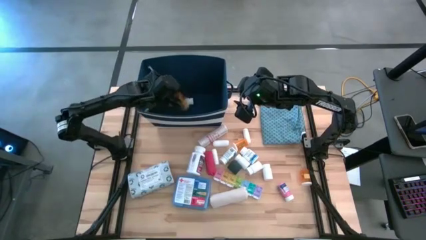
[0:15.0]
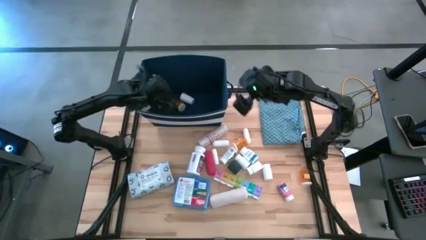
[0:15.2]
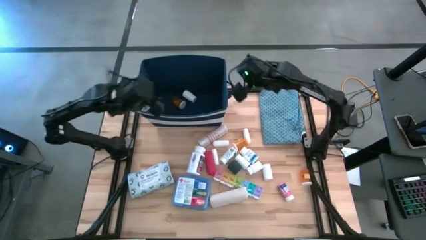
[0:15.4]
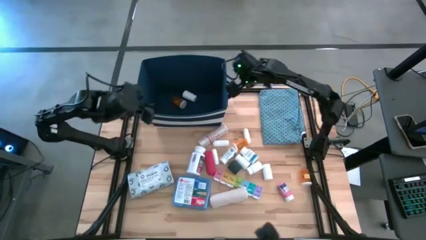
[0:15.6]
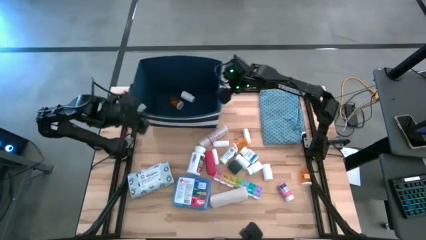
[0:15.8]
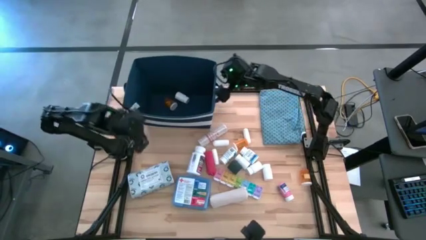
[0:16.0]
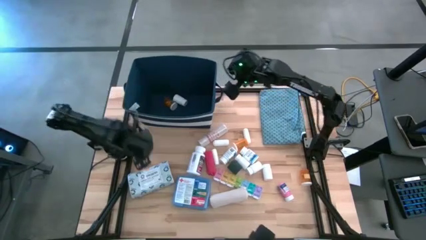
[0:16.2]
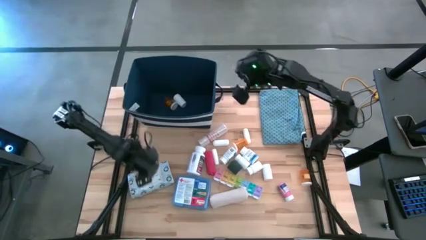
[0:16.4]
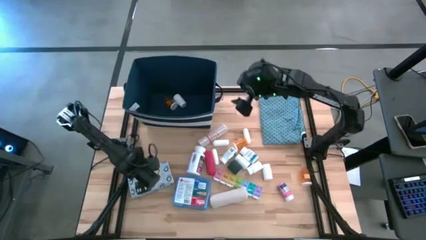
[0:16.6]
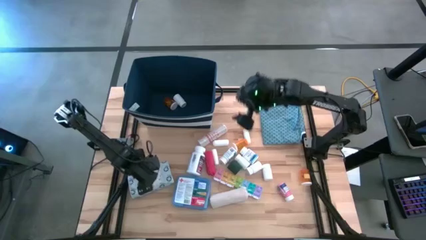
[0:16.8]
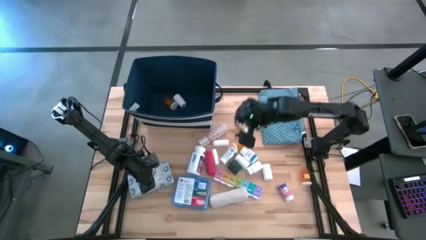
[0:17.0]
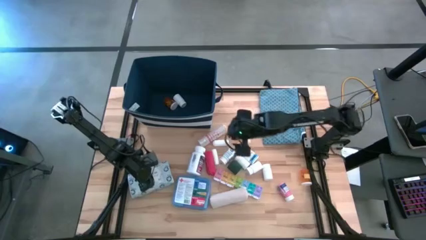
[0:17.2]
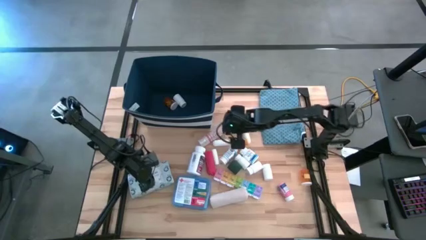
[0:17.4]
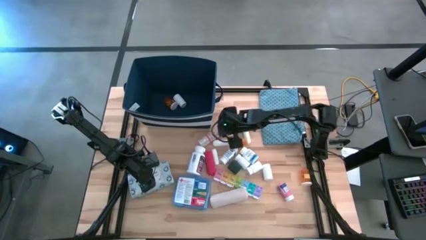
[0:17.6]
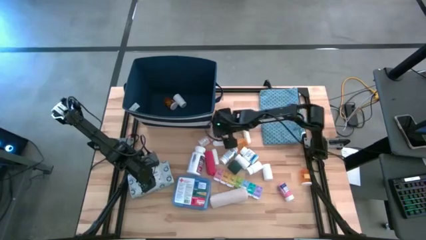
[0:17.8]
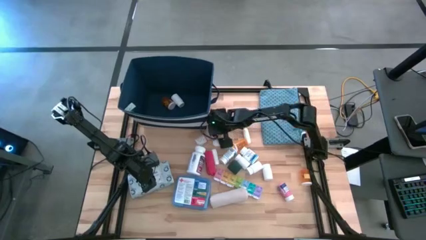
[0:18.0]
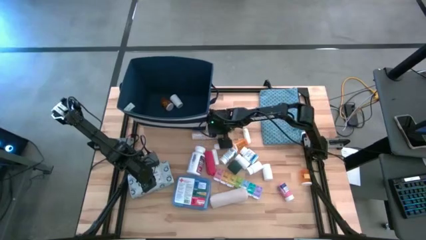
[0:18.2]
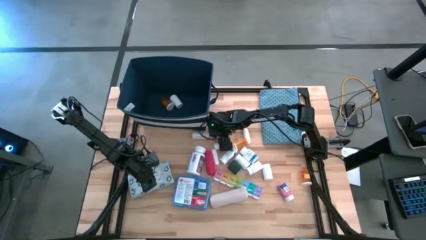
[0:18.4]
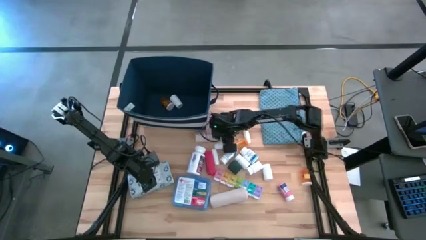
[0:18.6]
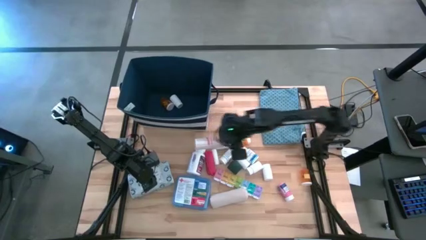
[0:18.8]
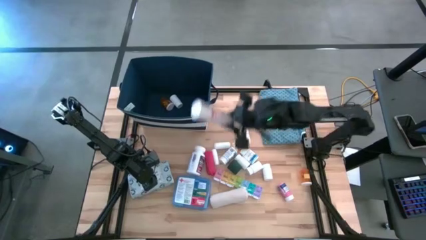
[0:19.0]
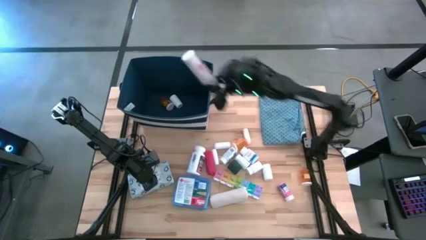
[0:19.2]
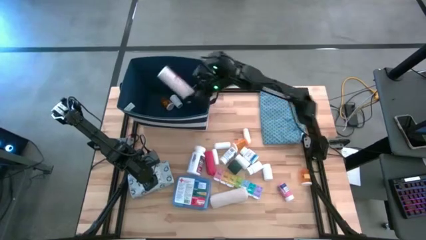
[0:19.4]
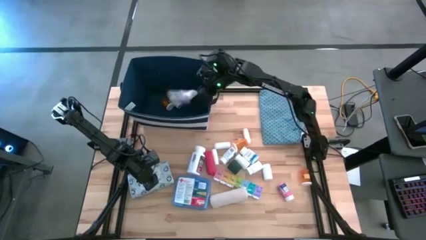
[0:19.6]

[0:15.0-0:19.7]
Task: Pick & place medical supplies in basket/bin
Put the brown bandage into the blue bin

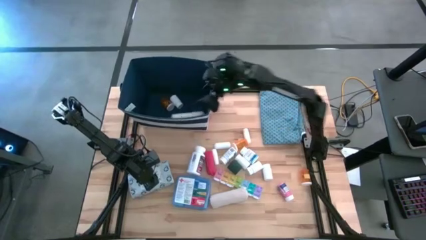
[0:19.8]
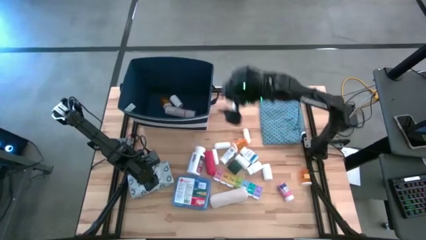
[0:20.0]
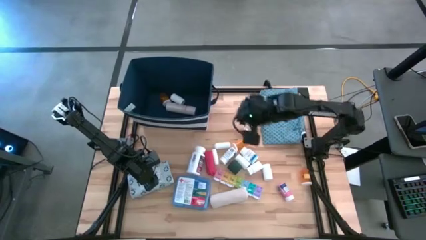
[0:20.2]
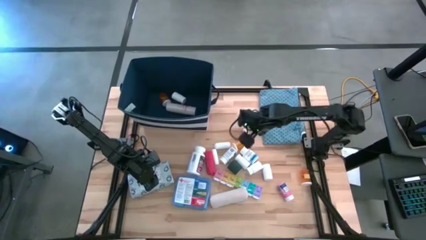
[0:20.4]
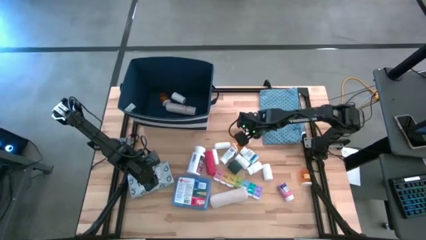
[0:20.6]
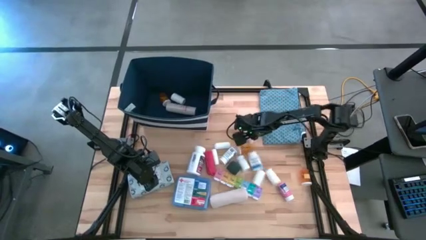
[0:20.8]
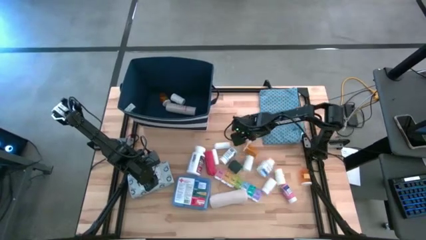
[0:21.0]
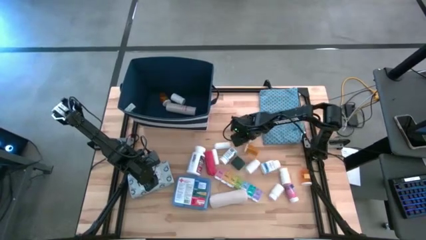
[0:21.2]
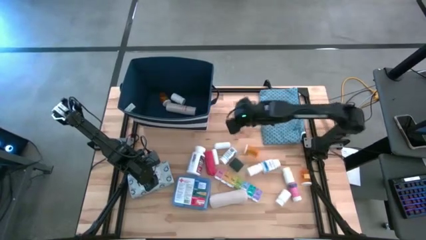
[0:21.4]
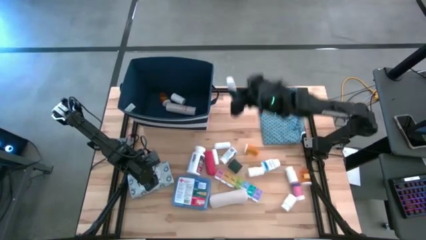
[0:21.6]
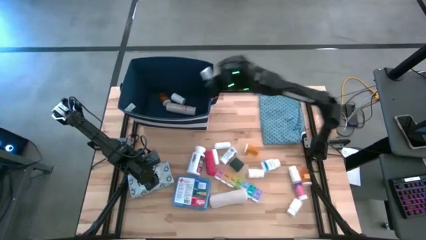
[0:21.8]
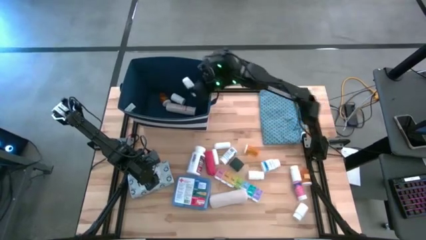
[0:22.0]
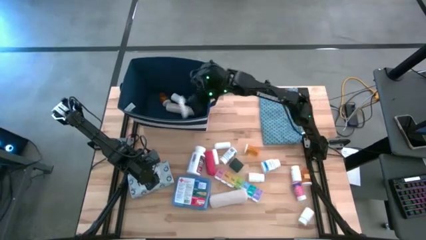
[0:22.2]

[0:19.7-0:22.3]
Put the top rolled gauze into the blue bin

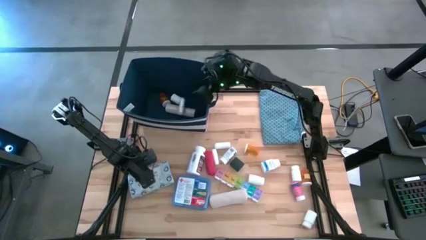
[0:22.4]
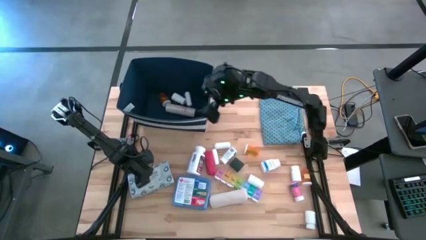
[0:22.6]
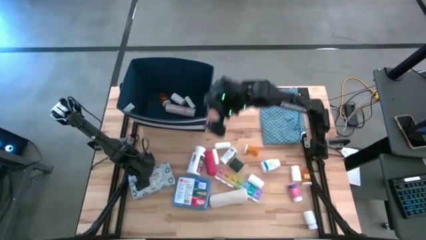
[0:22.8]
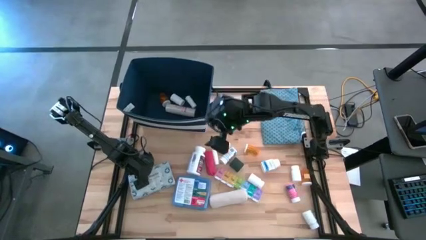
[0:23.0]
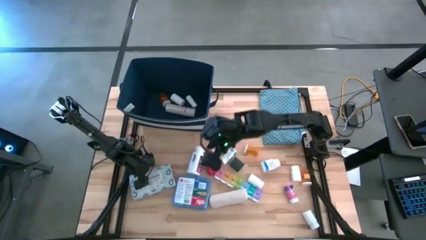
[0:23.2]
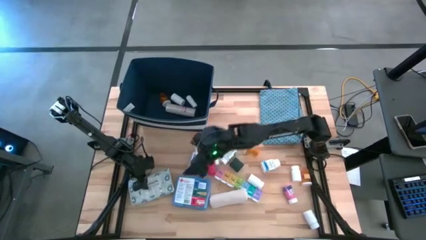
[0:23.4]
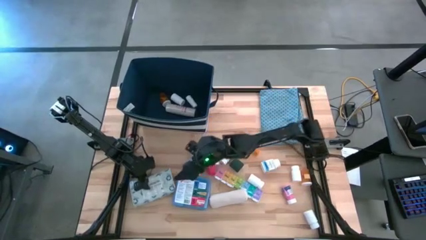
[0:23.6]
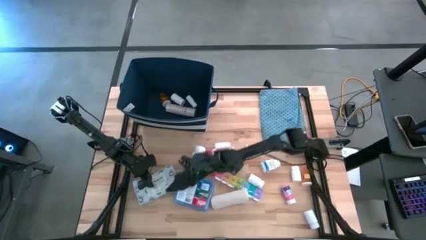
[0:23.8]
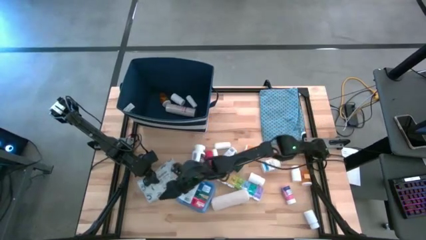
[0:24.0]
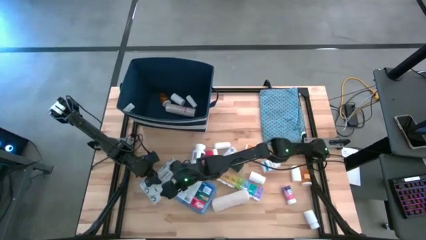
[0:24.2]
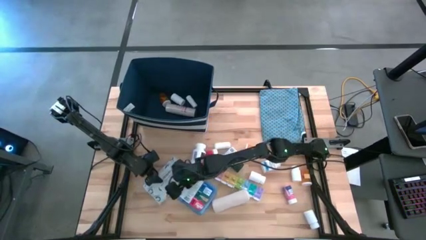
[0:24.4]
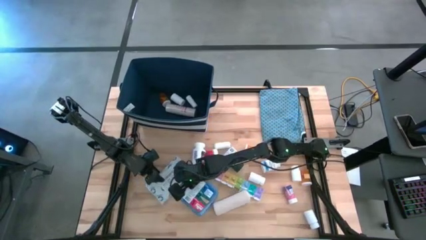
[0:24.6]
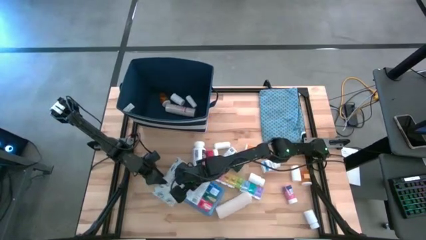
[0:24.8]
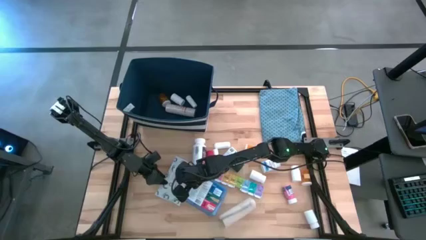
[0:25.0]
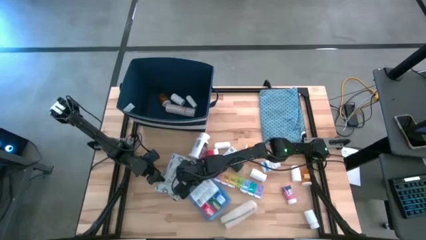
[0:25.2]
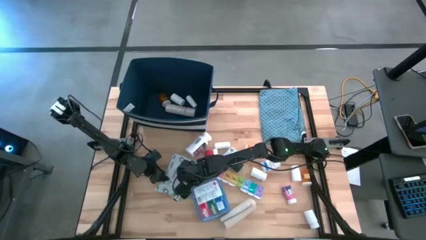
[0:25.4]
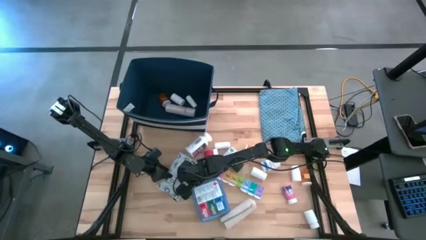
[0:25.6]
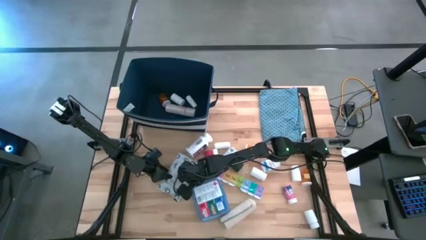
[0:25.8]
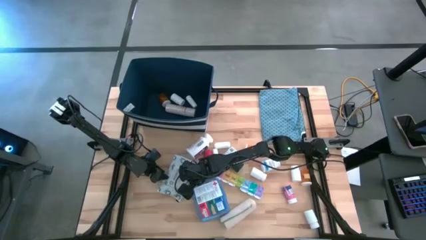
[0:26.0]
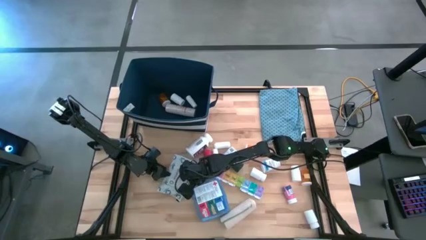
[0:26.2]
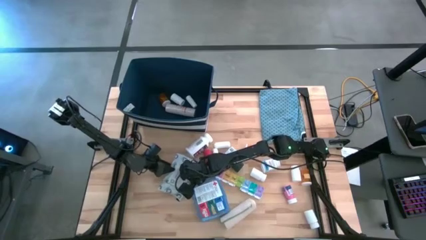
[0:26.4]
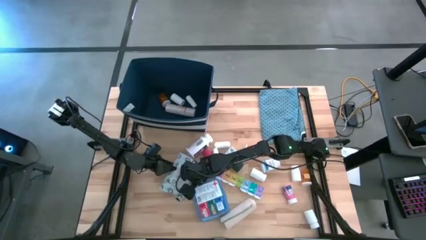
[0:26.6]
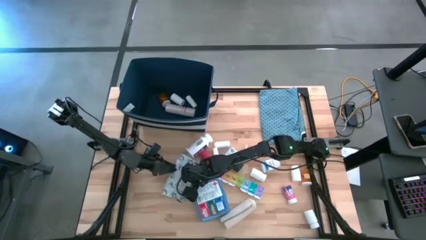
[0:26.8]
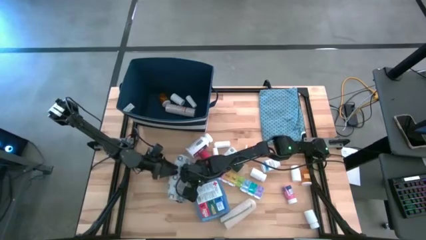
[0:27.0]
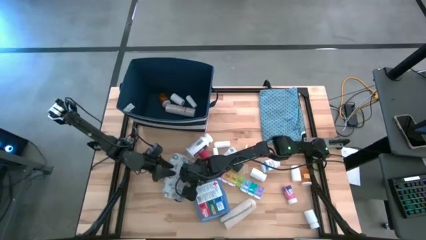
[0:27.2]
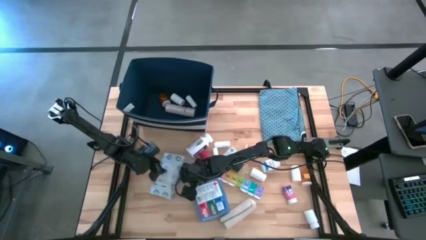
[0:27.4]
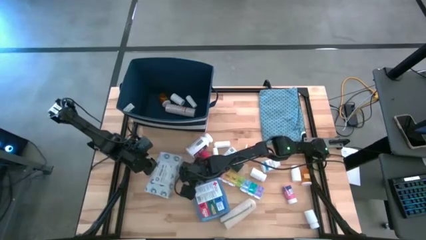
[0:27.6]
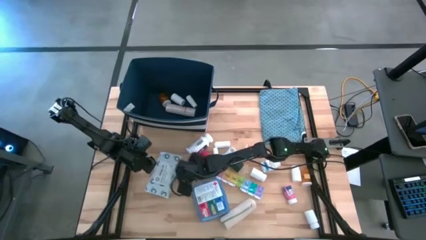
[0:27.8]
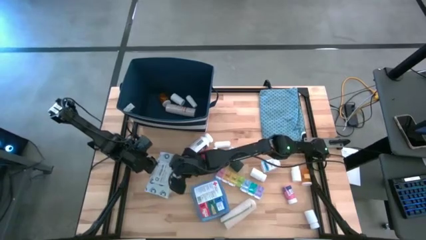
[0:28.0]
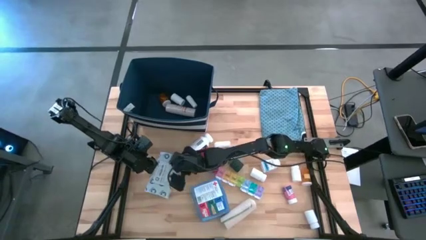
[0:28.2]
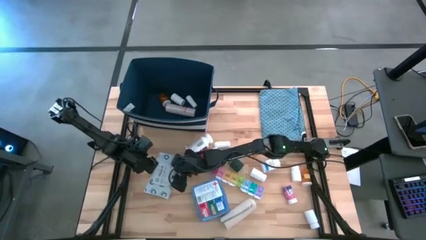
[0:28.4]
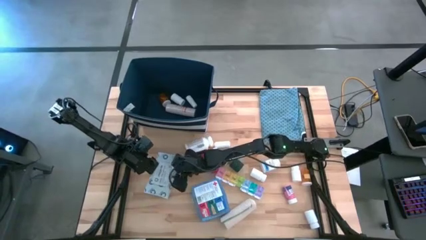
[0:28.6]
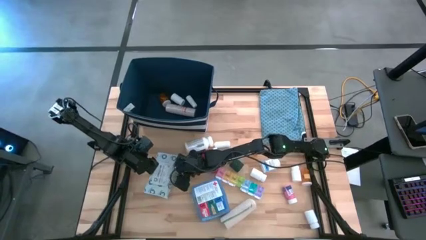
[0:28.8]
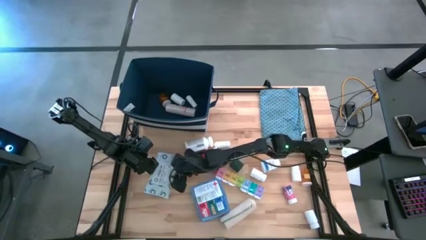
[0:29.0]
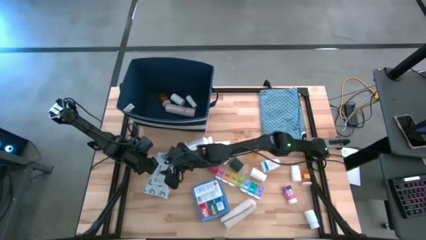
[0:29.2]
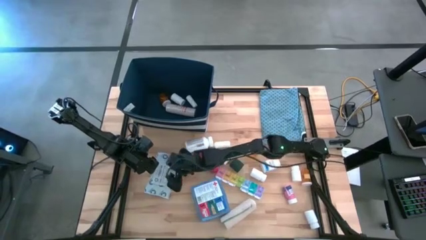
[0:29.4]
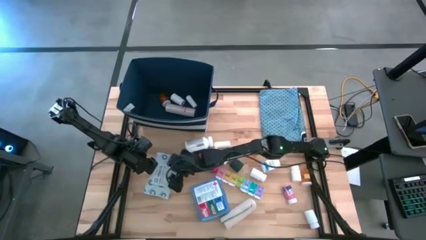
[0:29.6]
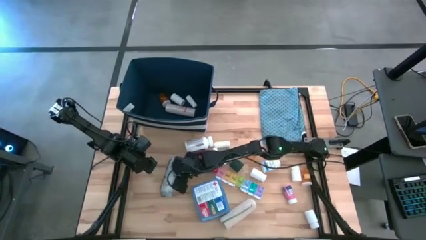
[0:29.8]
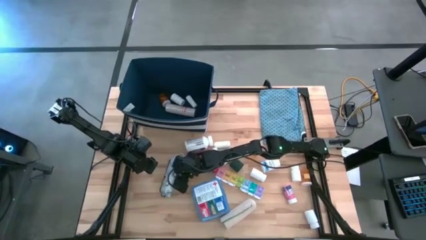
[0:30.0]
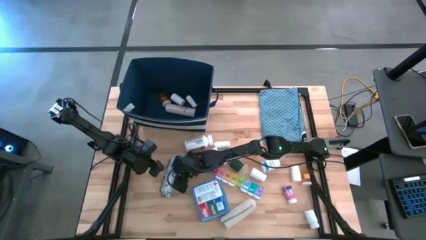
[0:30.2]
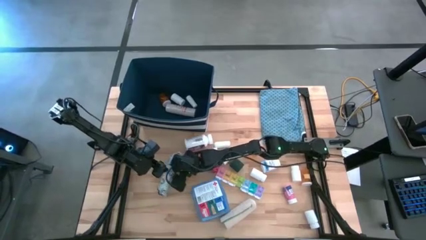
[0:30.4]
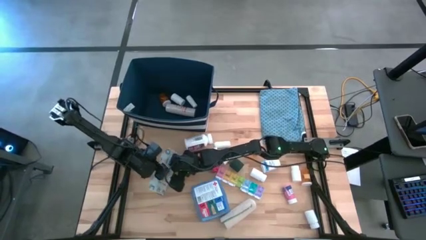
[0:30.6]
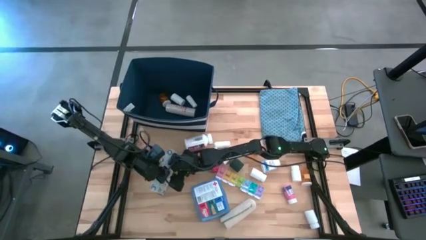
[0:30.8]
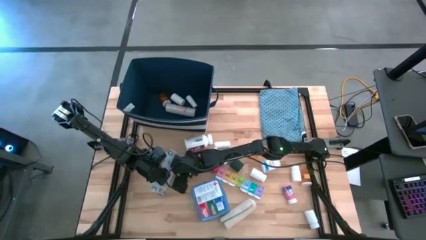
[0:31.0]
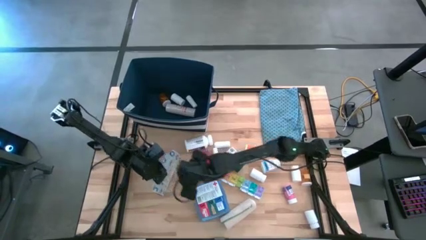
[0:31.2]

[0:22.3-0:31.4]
Put the medical supply bag into the blue bin

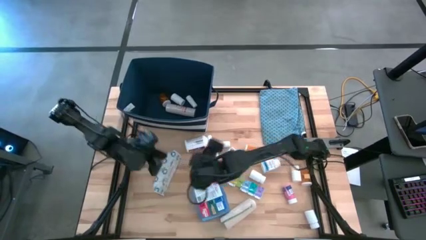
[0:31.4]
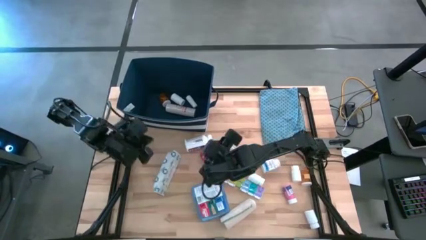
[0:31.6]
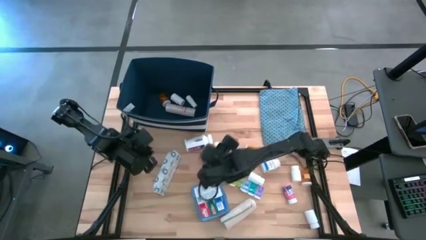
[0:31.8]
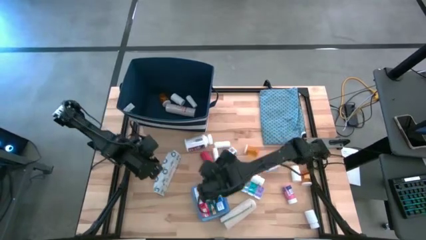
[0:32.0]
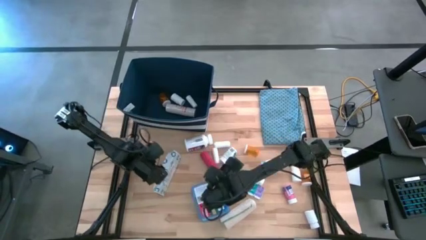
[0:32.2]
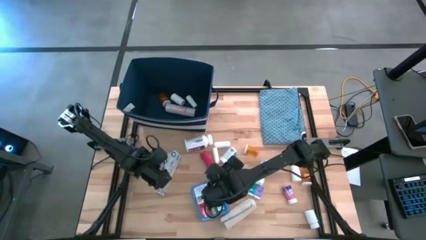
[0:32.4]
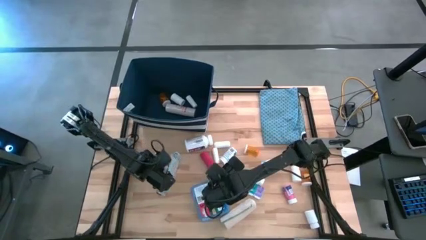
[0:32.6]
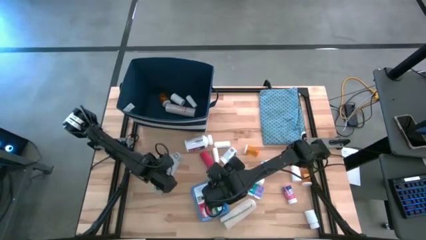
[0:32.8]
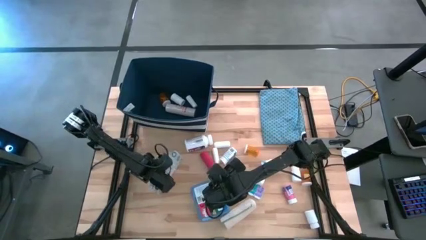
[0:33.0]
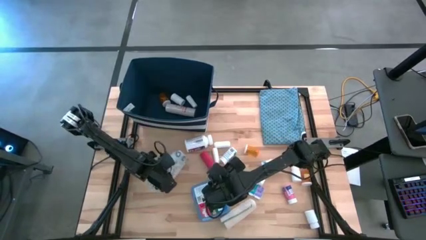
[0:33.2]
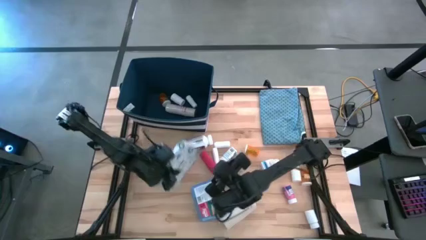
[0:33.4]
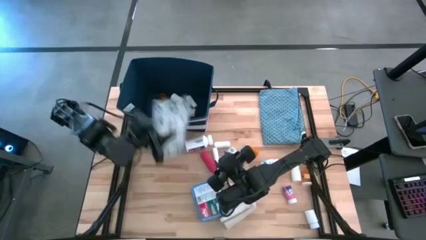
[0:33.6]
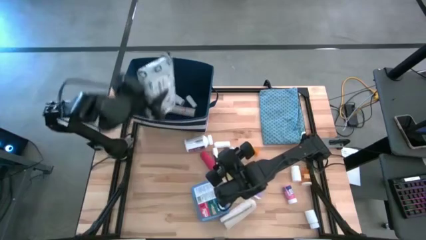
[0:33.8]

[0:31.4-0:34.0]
Put the medical supply bag into the blue bin
